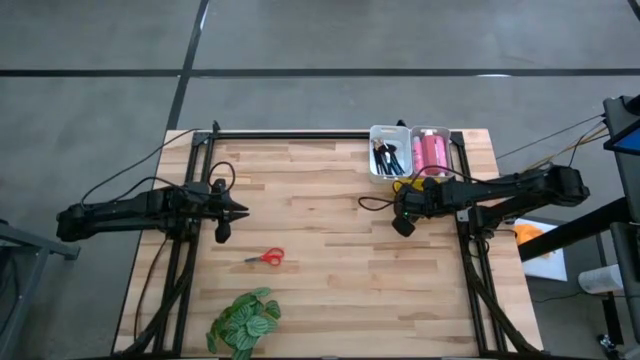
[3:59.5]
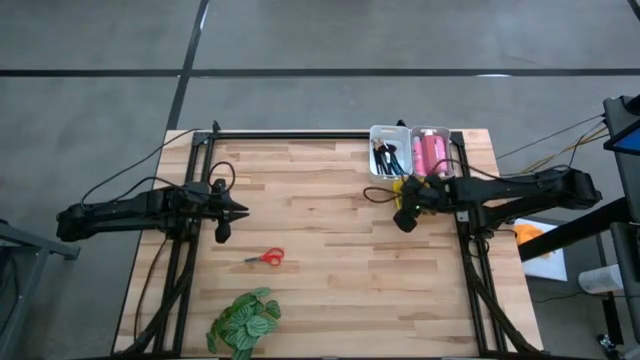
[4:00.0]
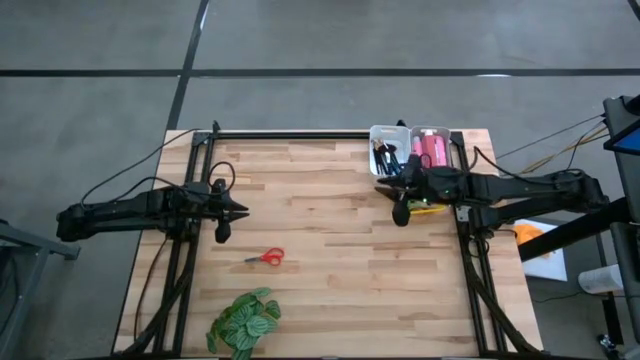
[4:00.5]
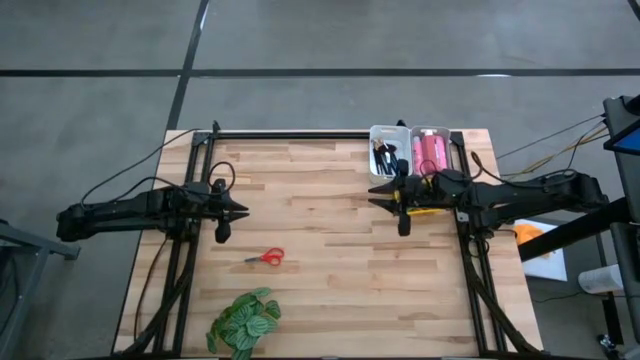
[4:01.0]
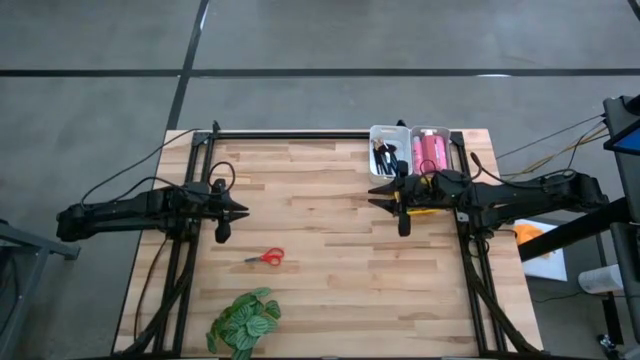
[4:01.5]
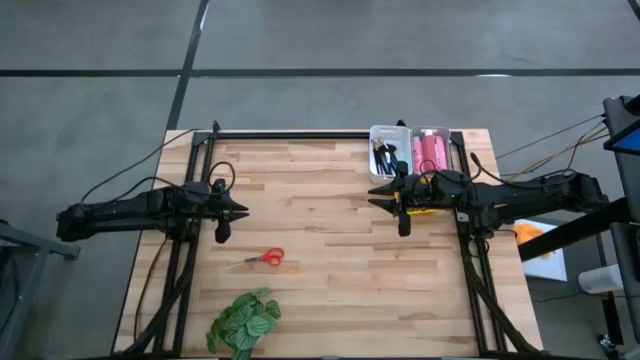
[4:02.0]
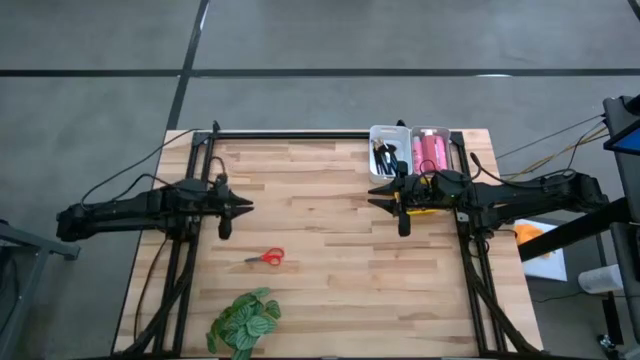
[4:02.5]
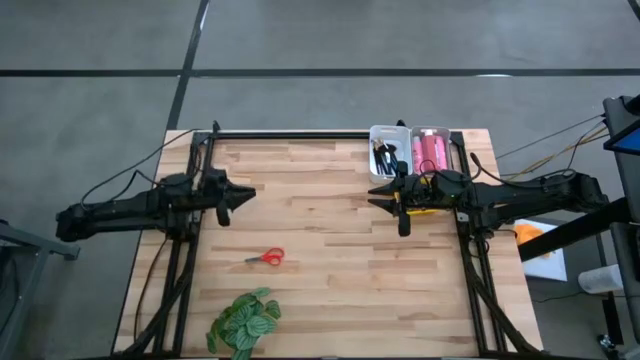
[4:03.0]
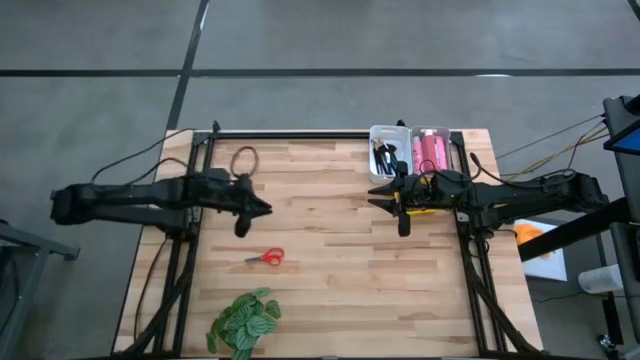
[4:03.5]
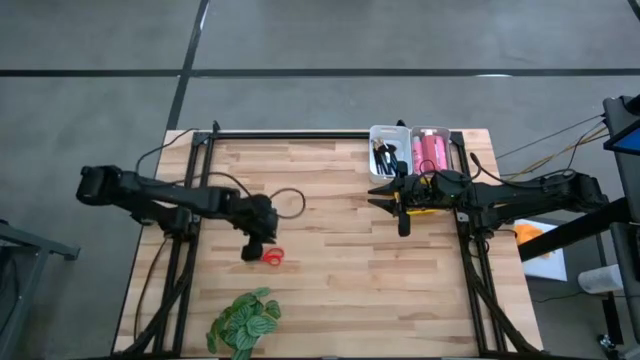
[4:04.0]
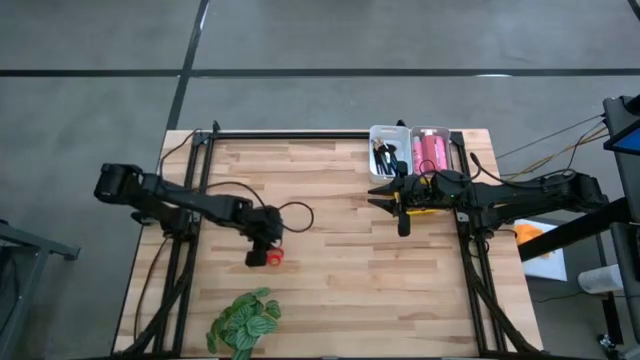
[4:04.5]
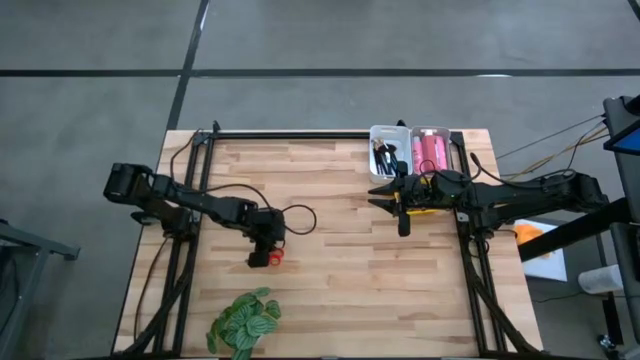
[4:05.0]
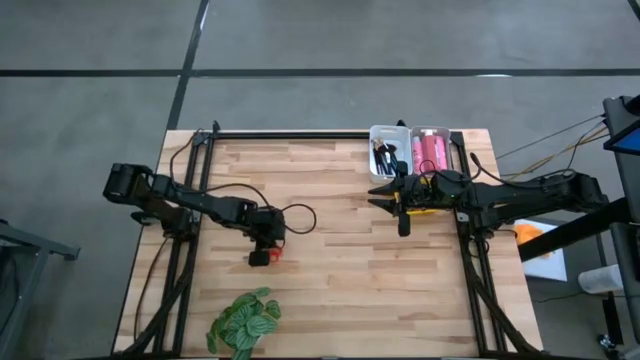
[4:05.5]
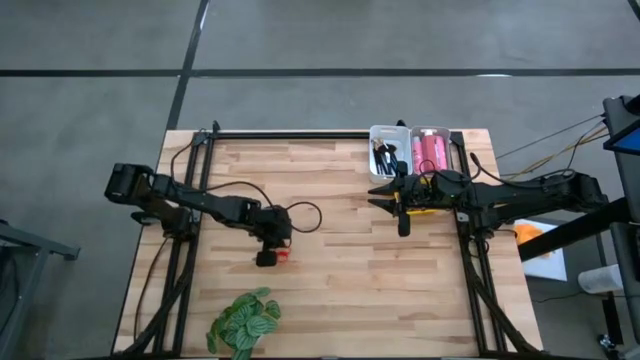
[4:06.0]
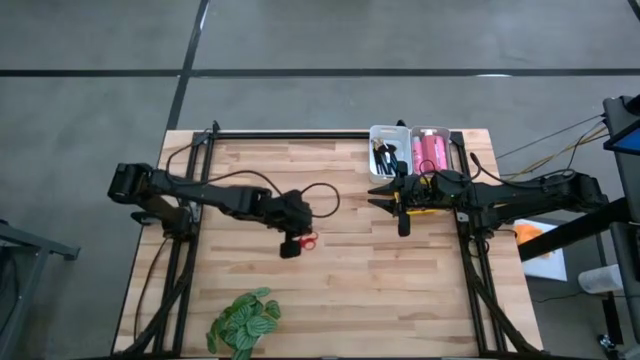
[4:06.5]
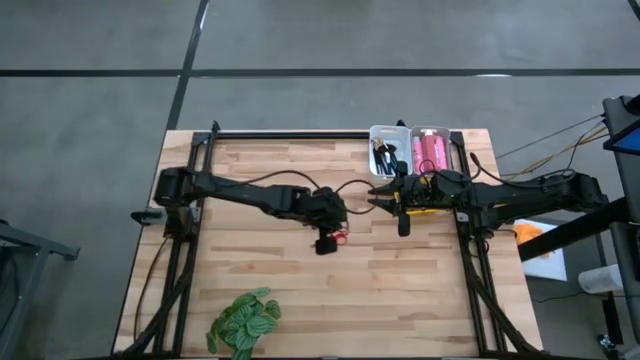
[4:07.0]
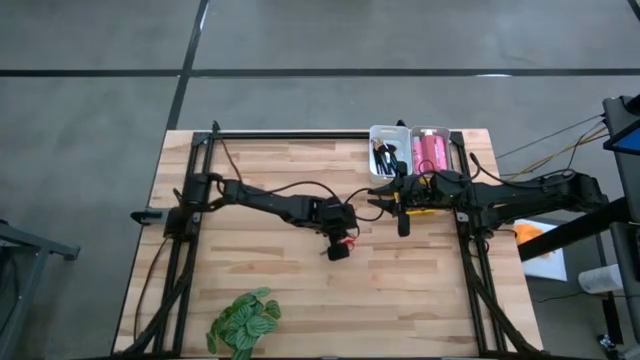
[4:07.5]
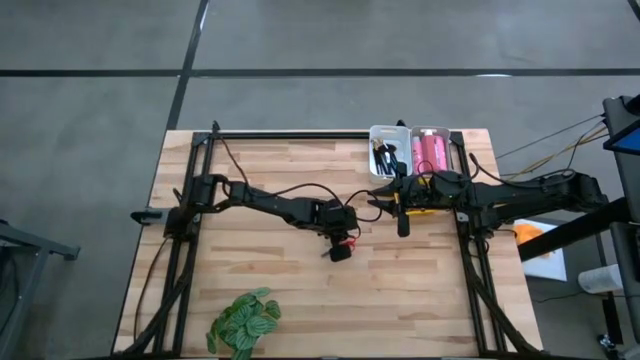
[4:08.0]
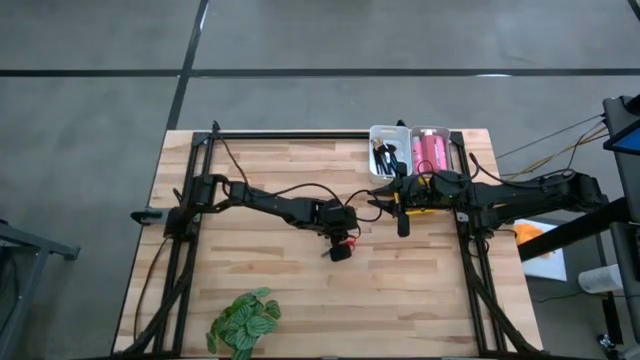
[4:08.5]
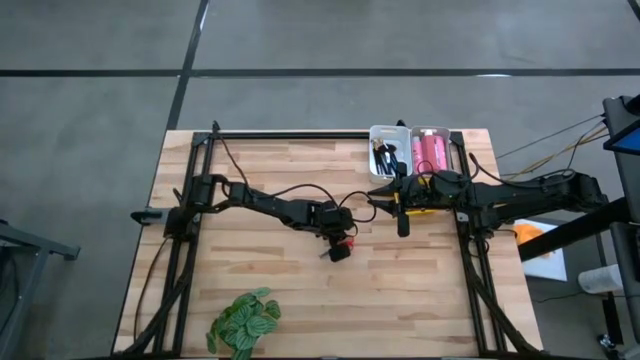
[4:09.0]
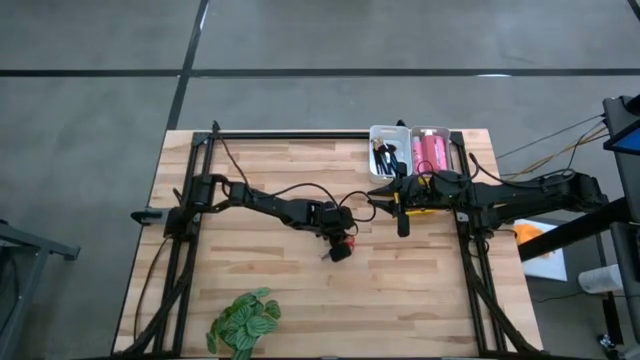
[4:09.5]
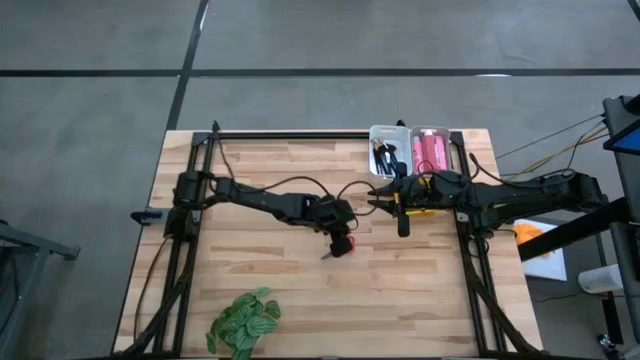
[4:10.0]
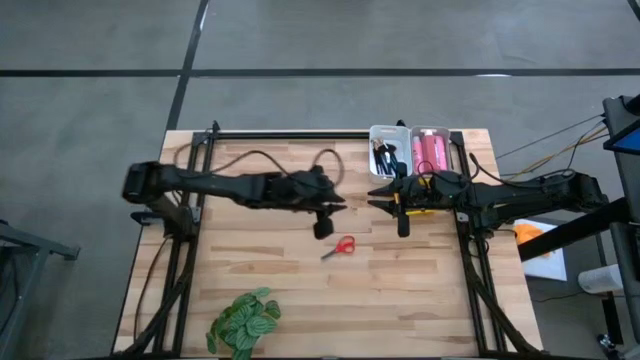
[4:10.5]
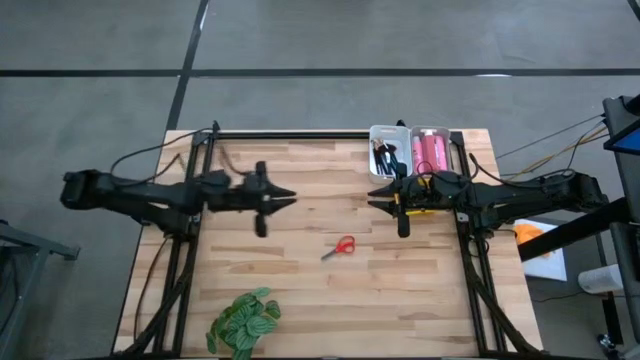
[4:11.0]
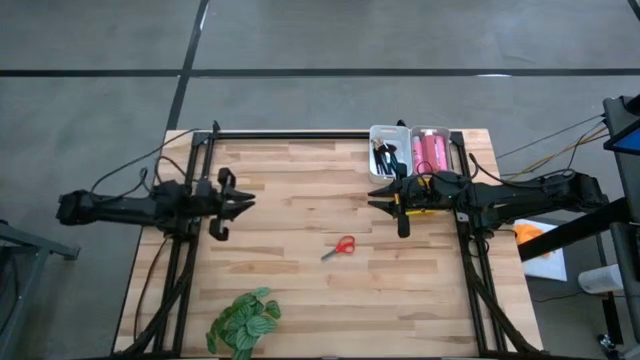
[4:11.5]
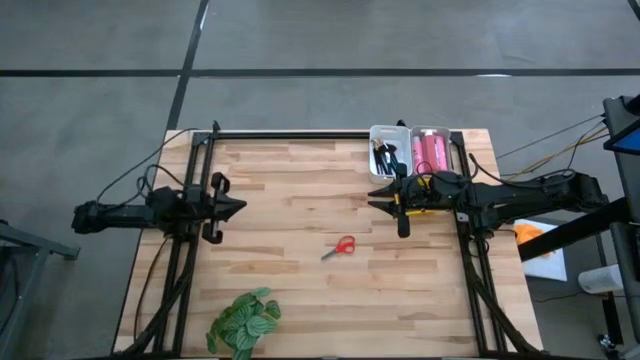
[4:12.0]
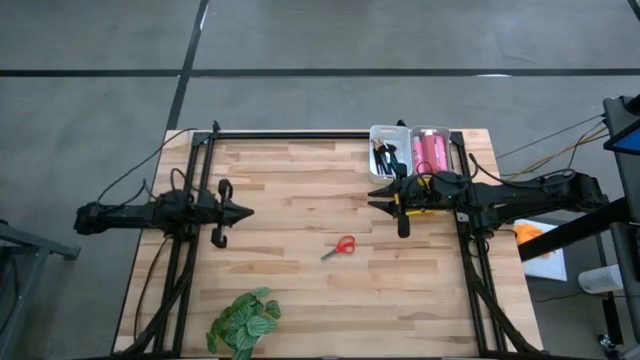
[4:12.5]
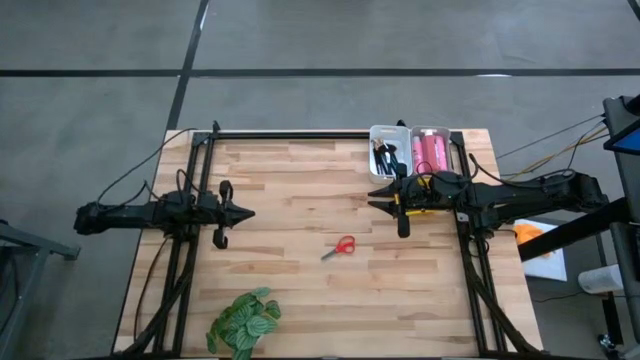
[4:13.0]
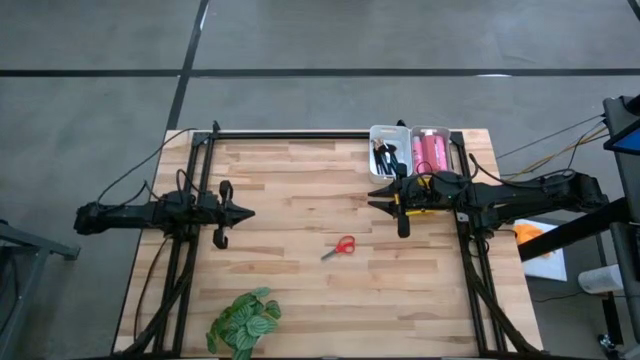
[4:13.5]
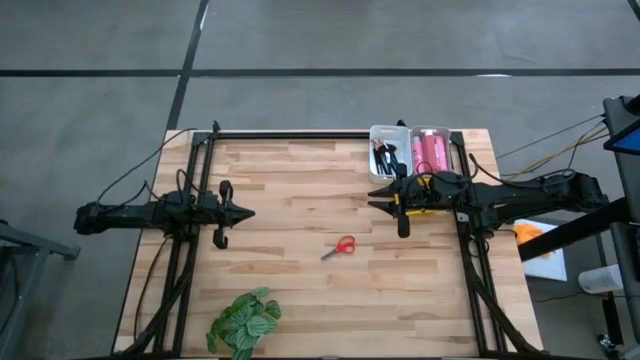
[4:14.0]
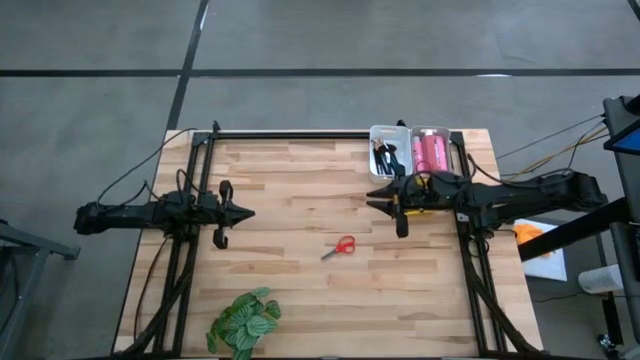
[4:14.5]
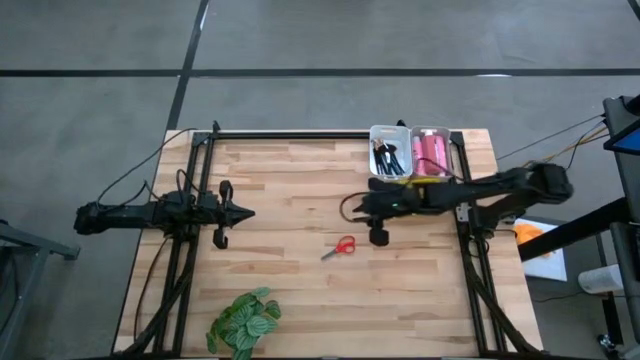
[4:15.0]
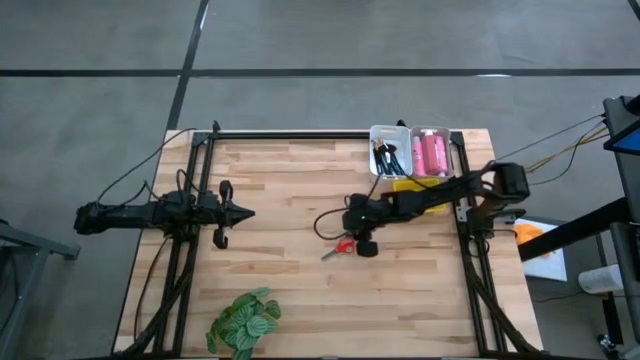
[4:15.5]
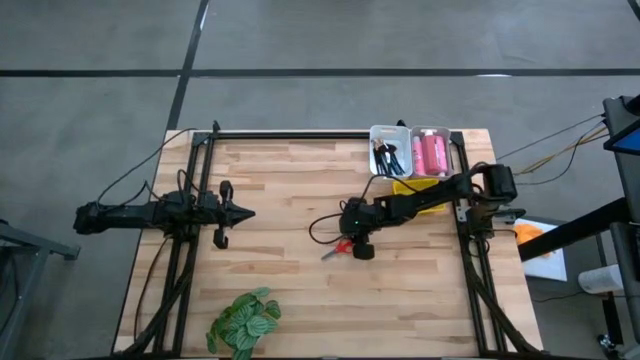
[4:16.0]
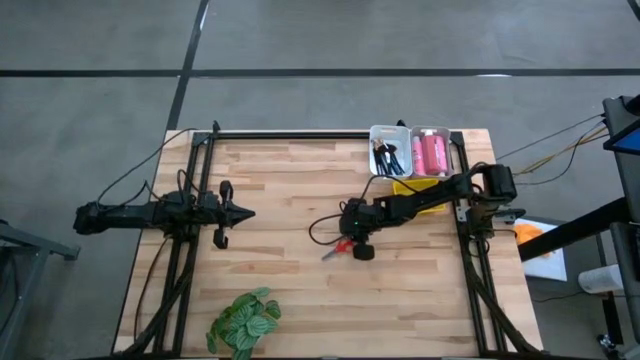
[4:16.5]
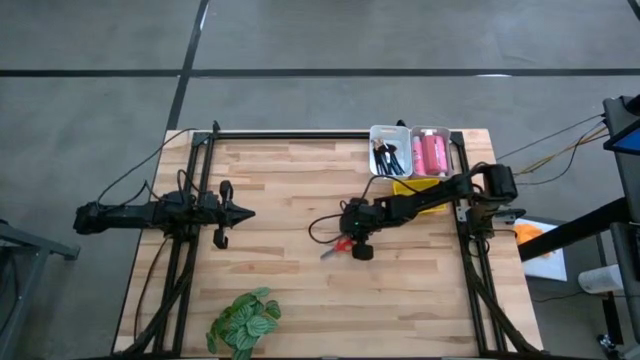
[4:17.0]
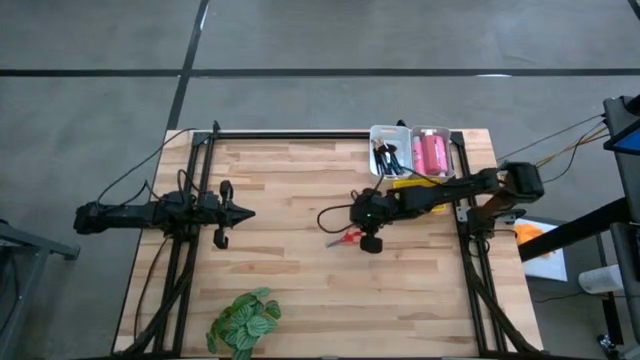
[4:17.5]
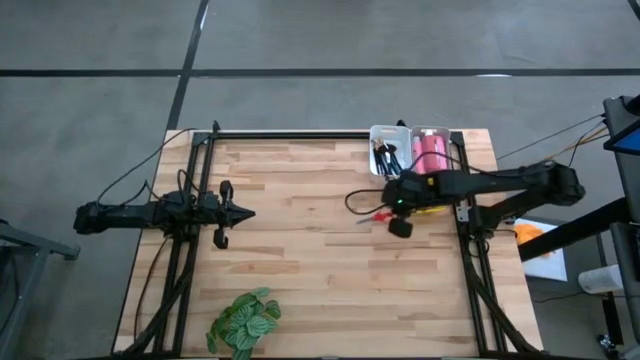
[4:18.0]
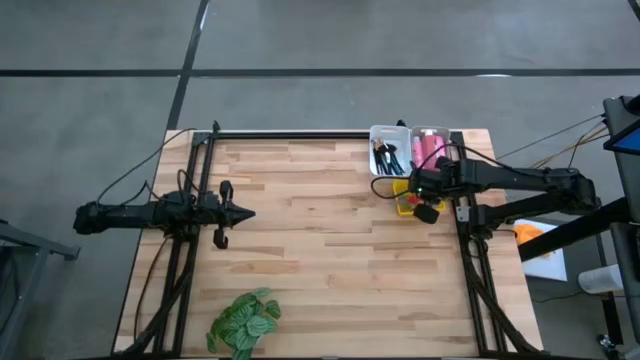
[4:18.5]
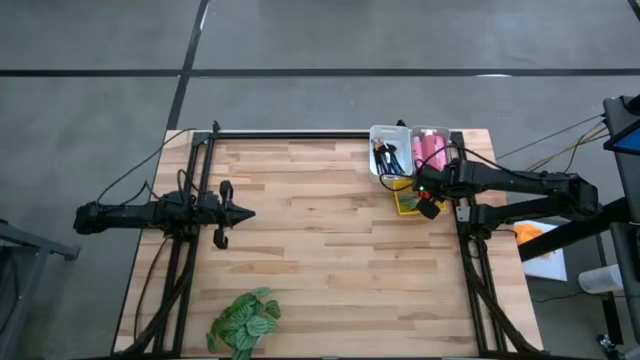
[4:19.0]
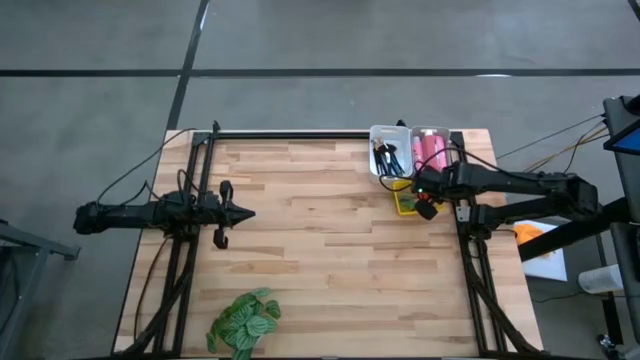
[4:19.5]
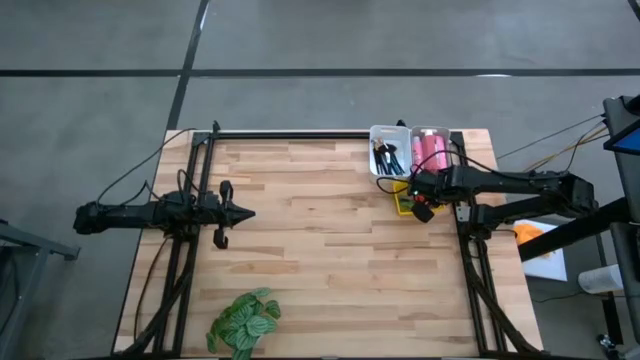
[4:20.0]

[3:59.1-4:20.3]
Task: Pick & Place Paint Supplies
Put the red scissors into the yellow bin
